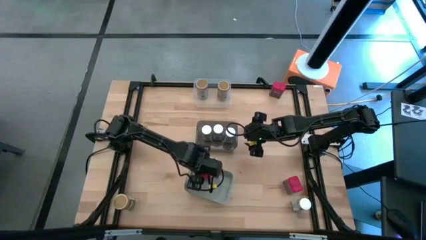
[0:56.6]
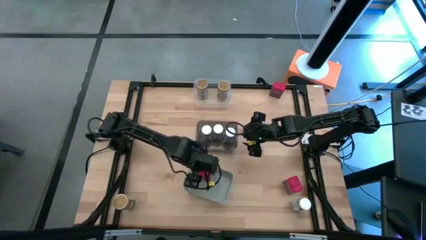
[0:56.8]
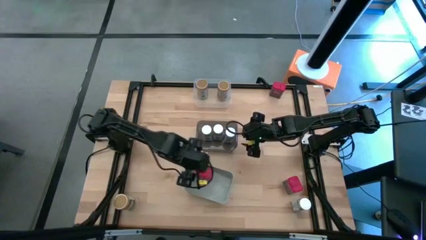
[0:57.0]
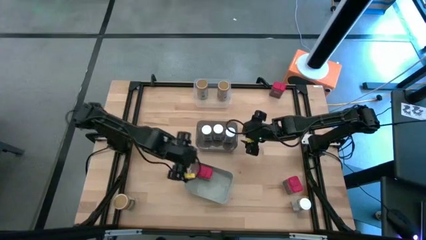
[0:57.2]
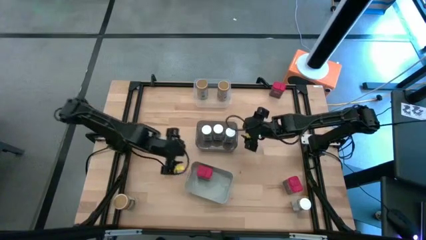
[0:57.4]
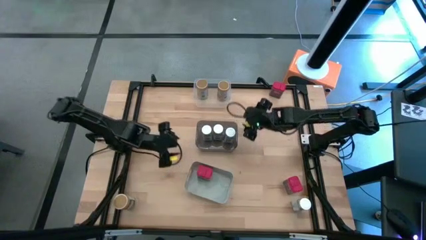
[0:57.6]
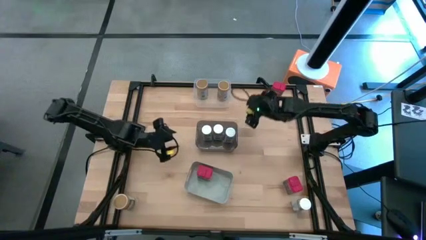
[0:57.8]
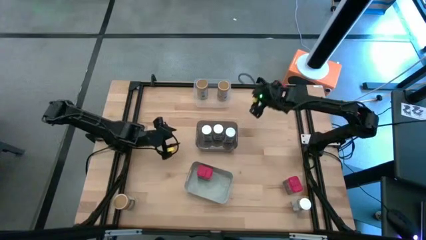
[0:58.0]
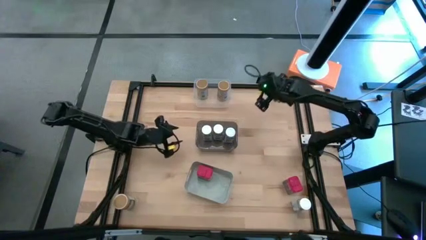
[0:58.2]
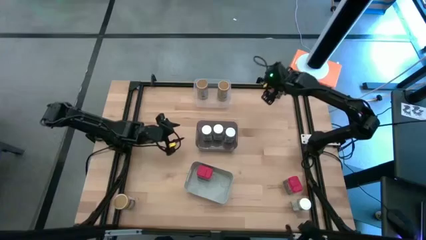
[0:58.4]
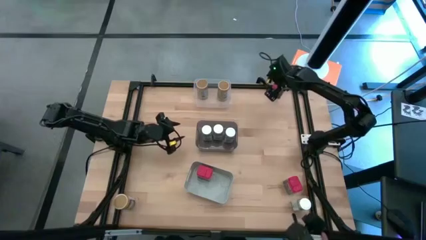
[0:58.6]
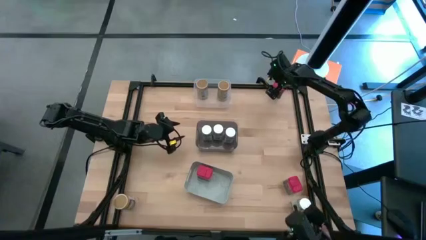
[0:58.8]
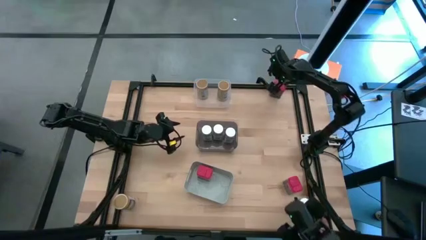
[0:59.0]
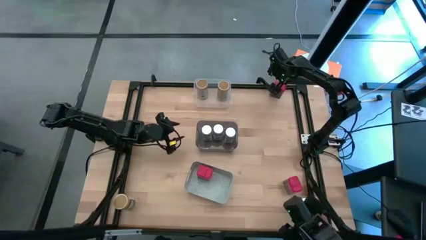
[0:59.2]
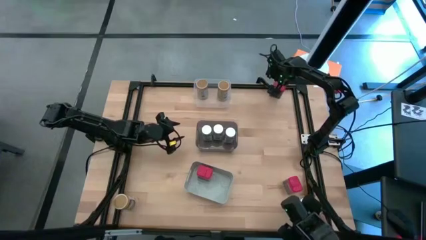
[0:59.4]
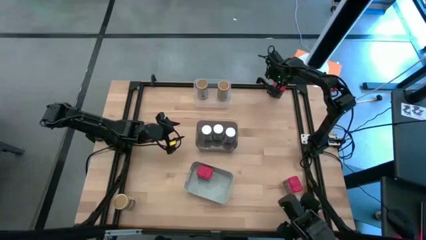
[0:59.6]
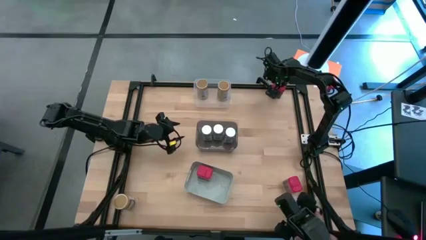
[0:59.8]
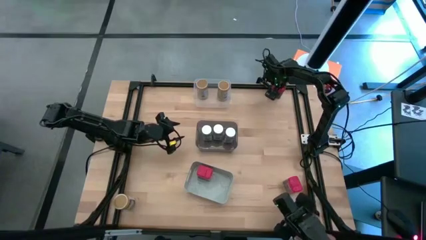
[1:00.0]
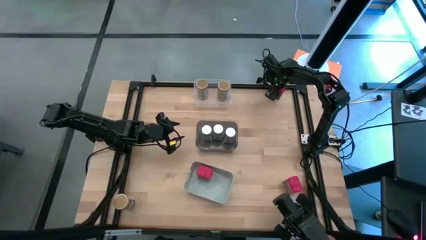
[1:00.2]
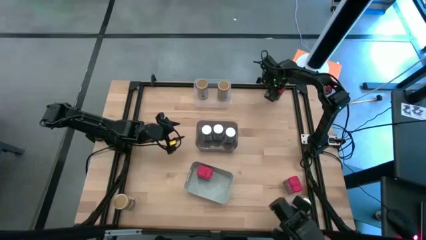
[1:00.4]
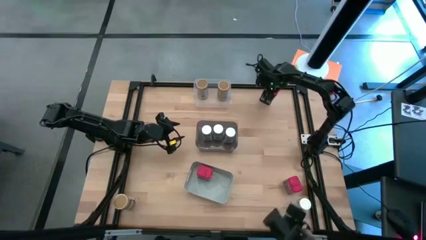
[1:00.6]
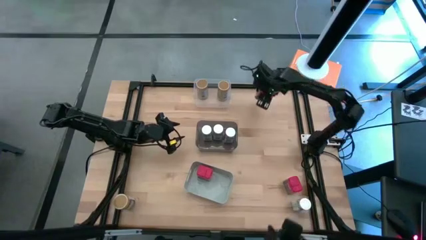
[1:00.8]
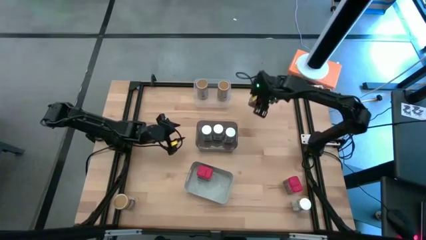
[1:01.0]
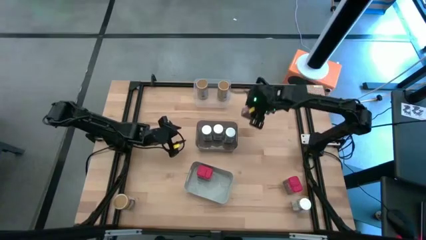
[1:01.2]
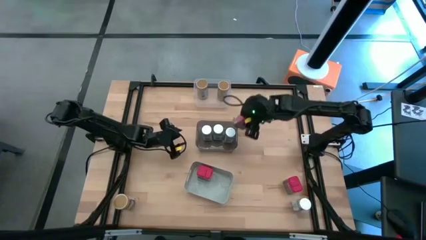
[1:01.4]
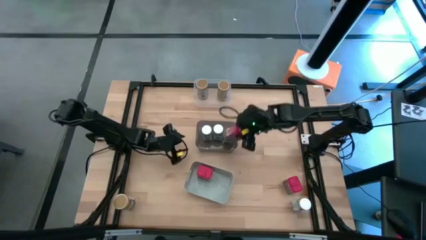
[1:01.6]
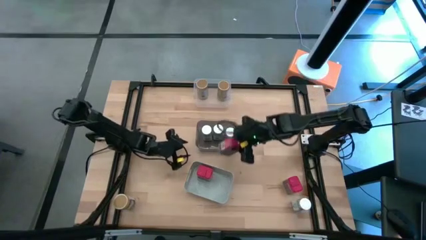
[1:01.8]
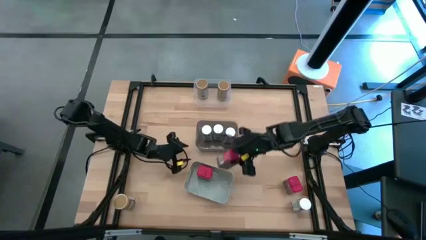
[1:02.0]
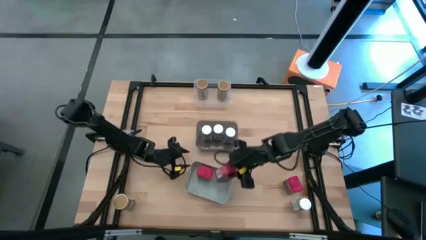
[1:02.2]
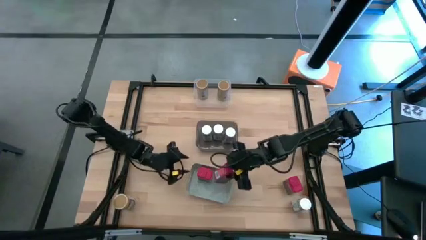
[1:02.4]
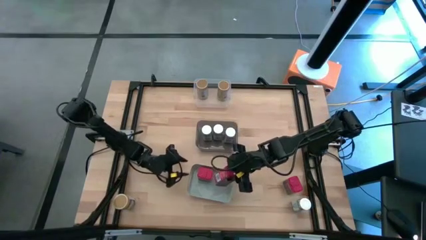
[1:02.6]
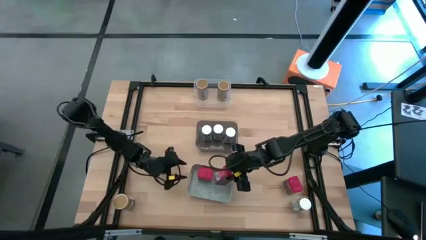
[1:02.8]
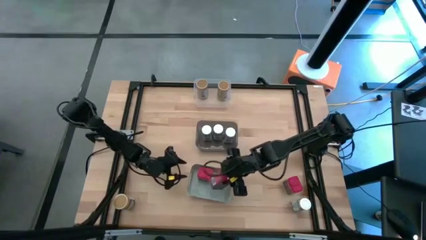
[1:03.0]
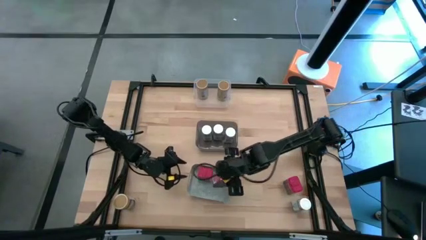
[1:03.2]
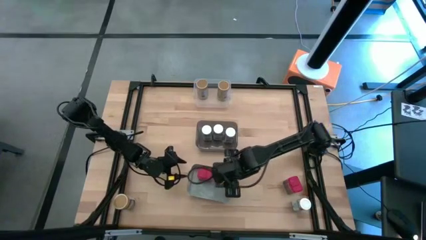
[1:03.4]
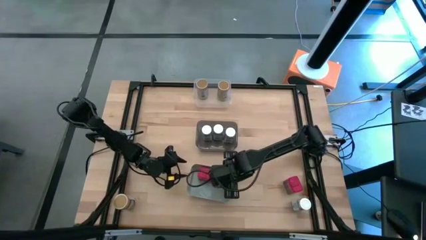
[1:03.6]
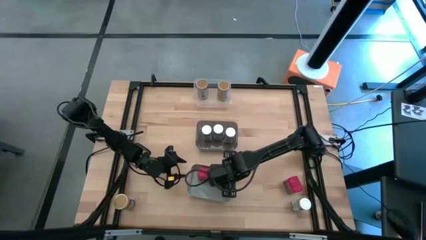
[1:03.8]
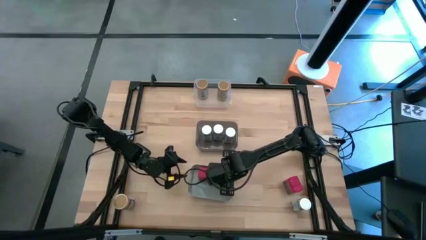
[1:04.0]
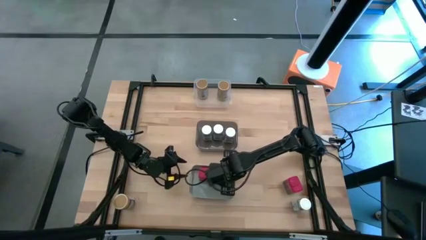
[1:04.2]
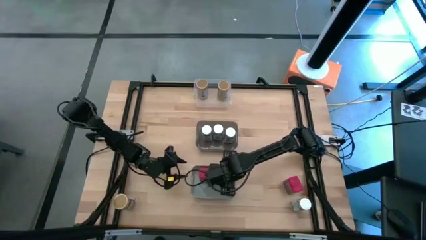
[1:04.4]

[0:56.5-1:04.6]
Task: Sort spices by type
Put the top red seasoning can into the gray bin

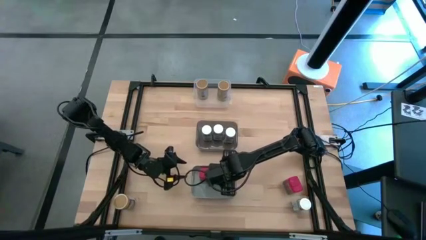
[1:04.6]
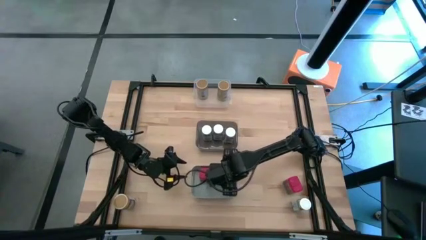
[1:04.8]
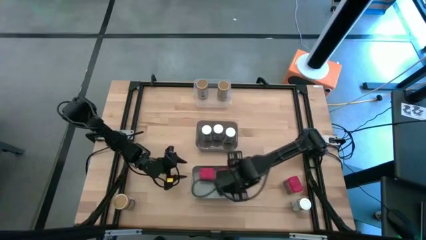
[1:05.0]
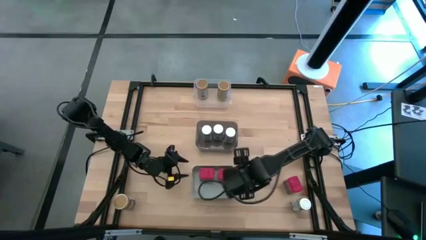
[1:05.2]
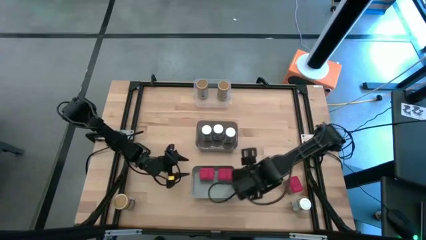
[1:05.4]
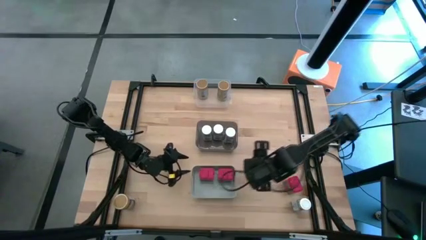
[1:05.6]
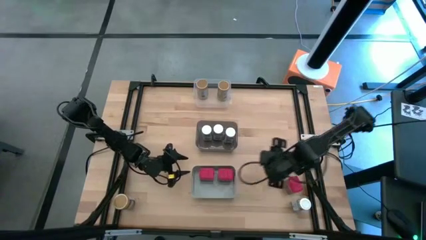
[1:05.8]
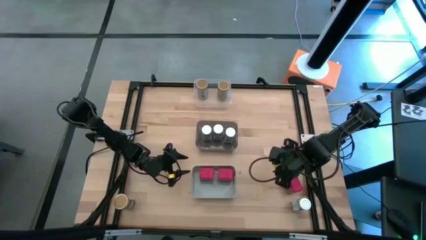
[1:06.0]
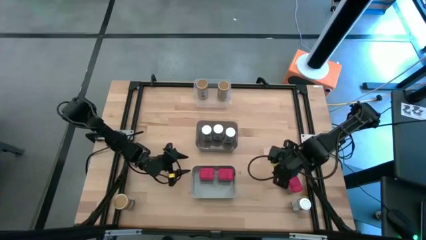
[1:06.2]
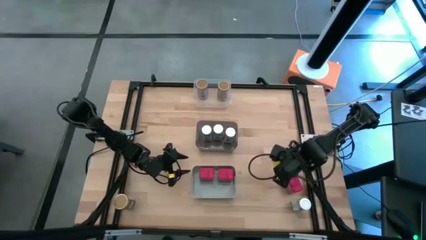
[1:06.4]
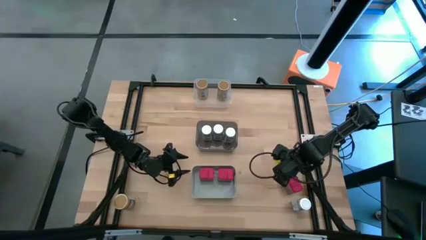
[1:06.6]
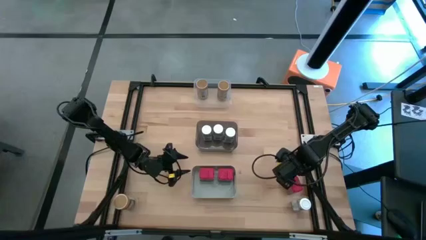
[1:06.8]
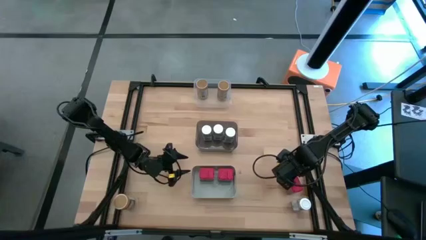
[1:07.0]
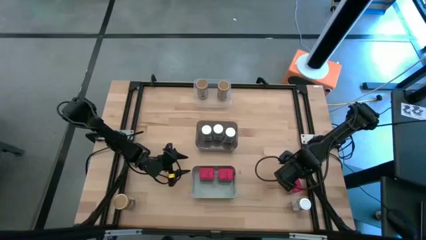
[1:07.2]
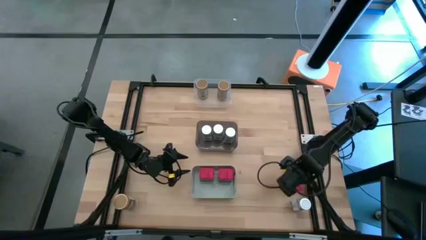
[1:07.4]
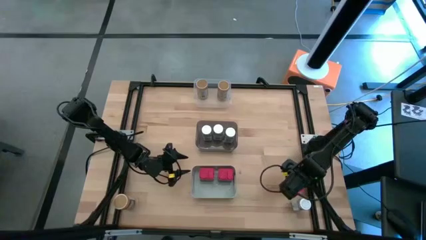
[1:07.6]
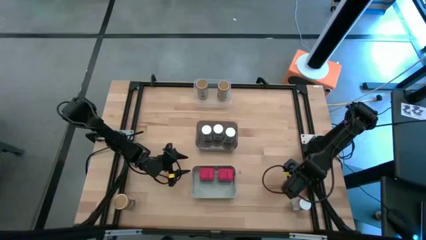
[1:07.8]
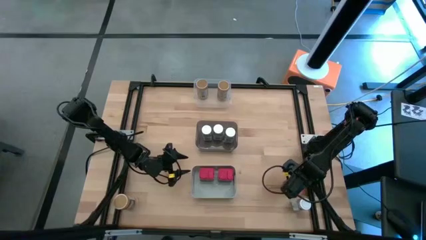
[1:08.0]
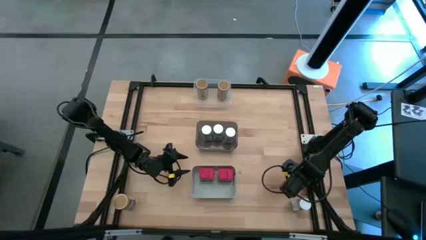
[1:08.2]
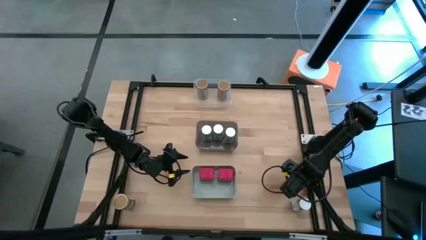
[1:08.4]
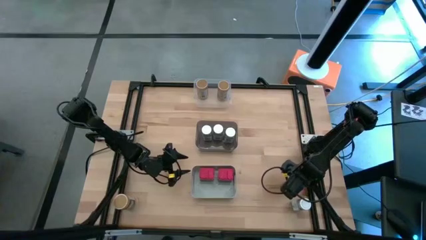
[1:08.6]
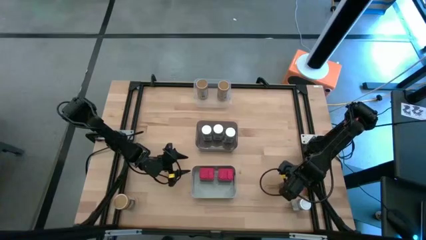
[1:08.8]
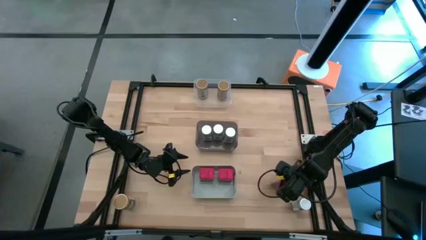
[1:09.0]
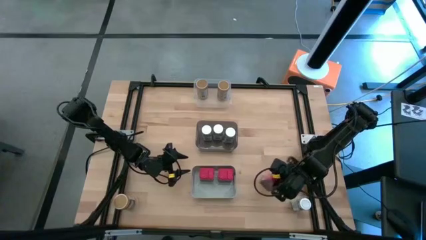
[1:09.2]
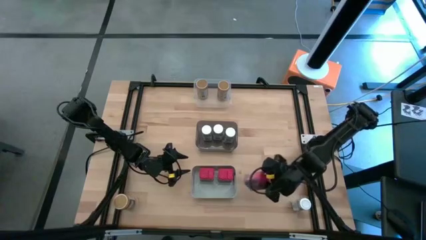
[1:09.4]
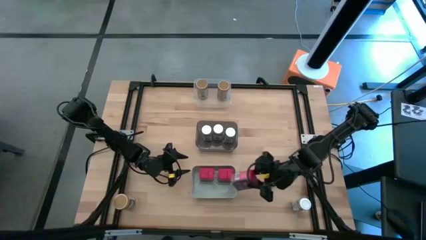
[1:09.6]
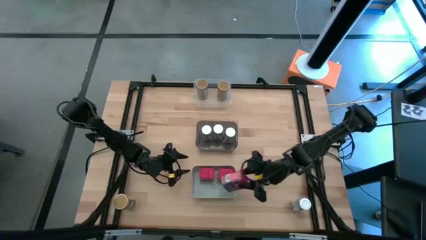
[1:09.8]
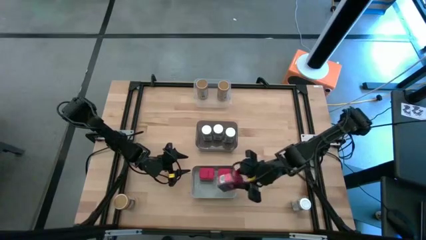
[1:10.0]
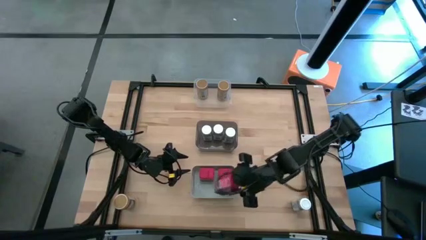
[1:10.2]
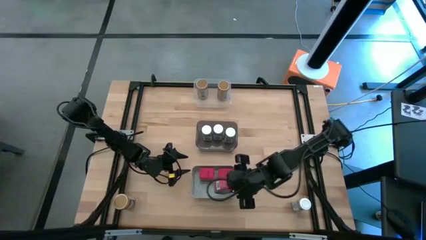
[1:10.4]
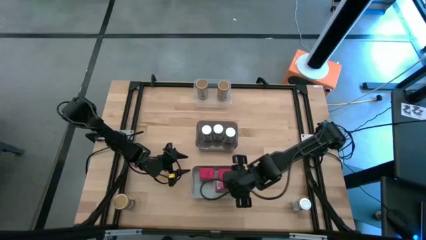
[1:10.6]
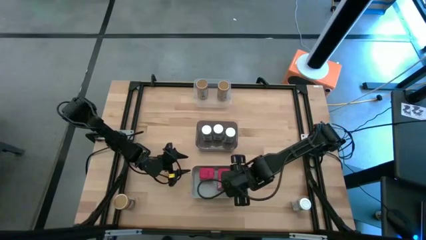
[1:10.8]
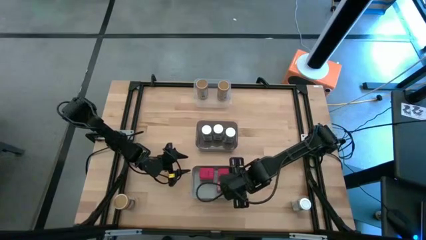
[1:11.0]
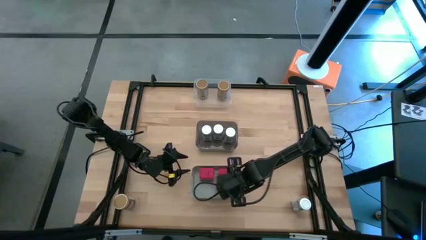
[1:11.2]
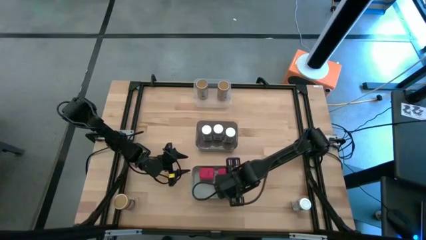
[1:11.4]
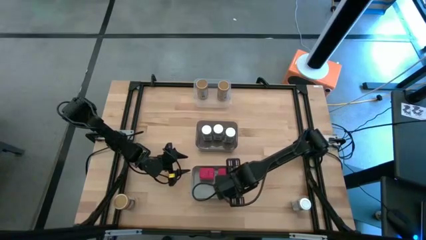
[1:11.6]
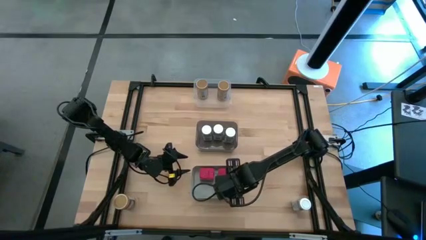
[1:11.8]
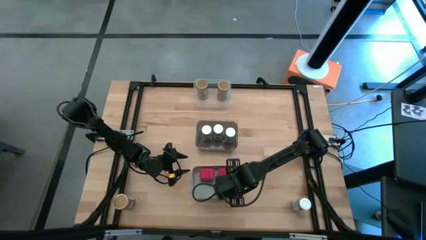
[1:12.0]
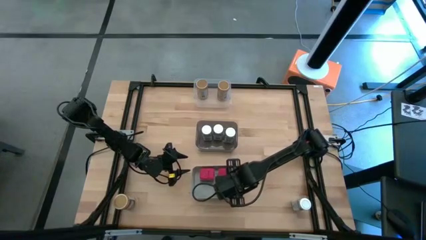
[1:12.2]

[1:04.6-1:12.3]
Put the red seasoning can into the gray bin
